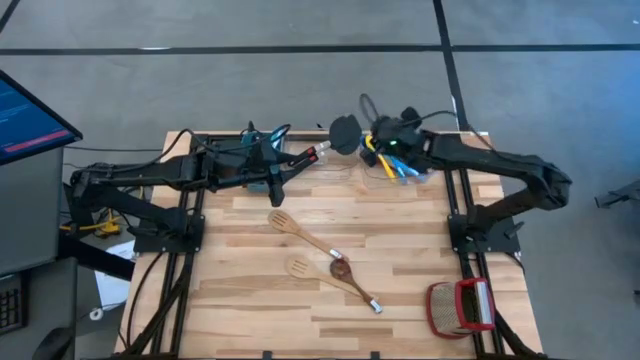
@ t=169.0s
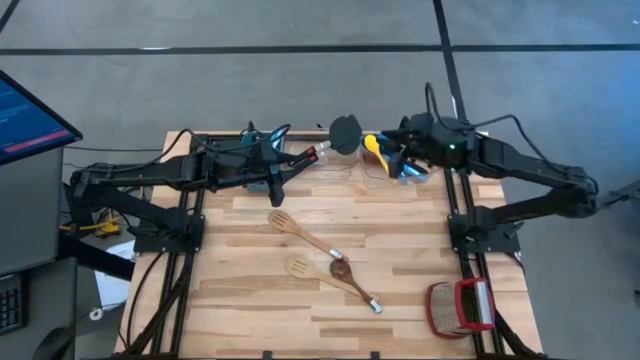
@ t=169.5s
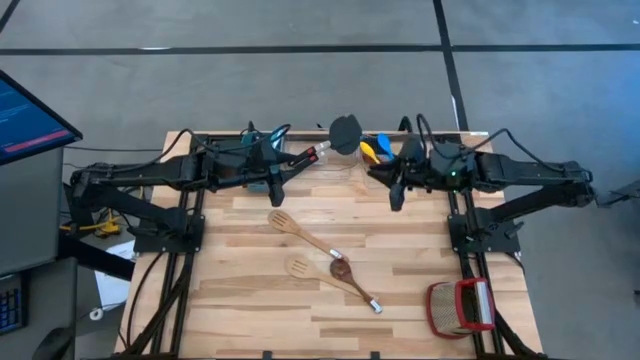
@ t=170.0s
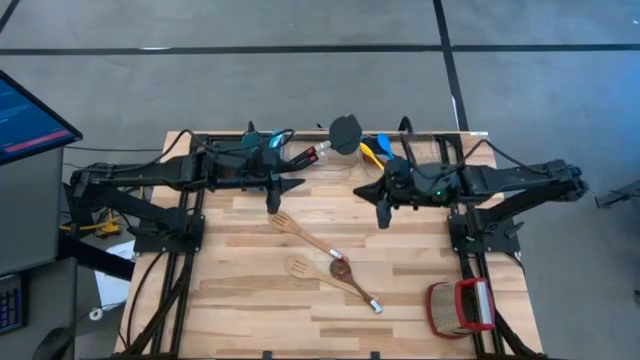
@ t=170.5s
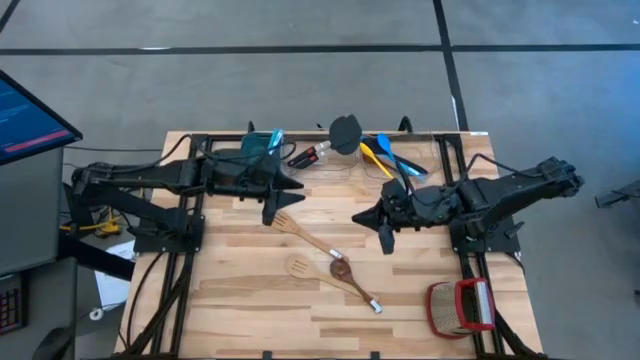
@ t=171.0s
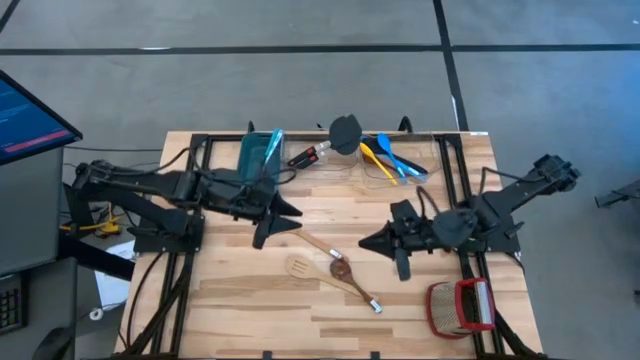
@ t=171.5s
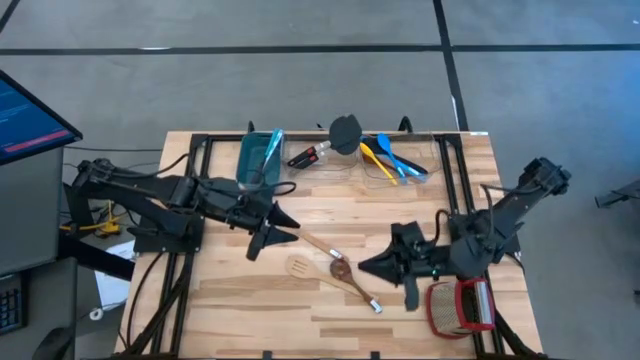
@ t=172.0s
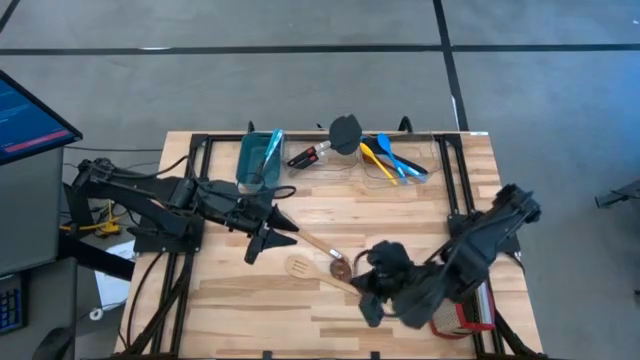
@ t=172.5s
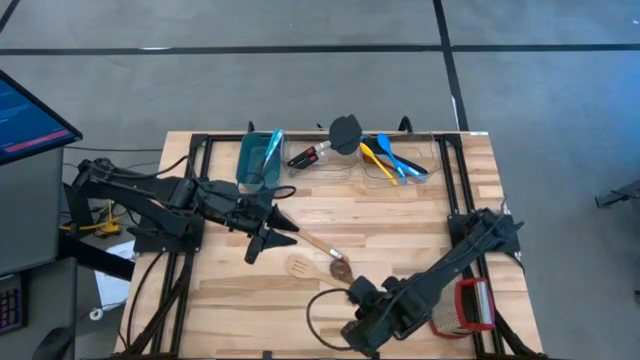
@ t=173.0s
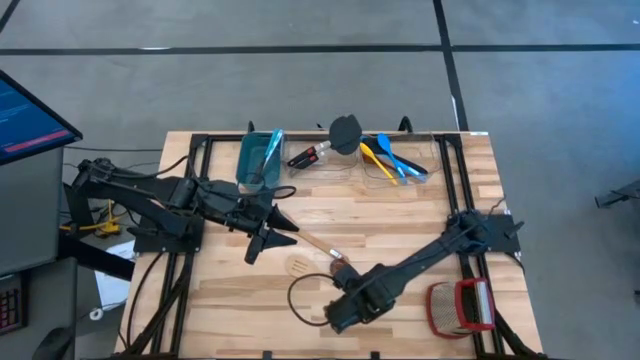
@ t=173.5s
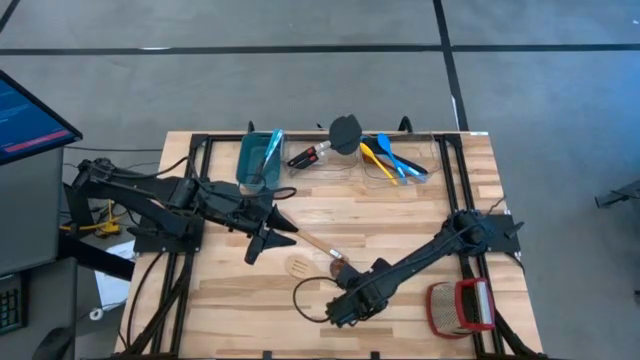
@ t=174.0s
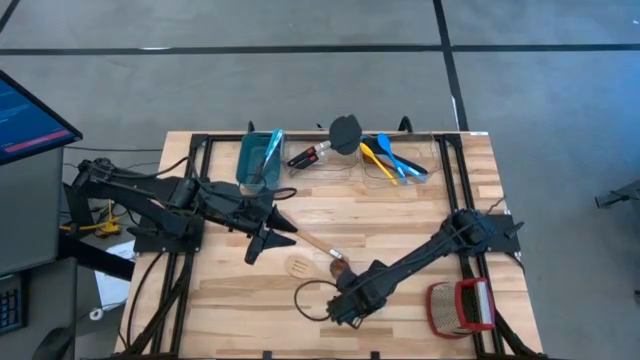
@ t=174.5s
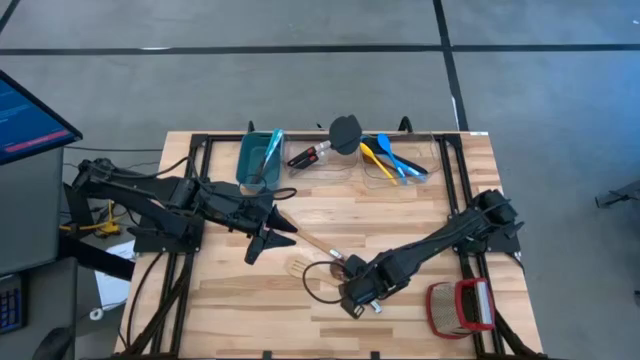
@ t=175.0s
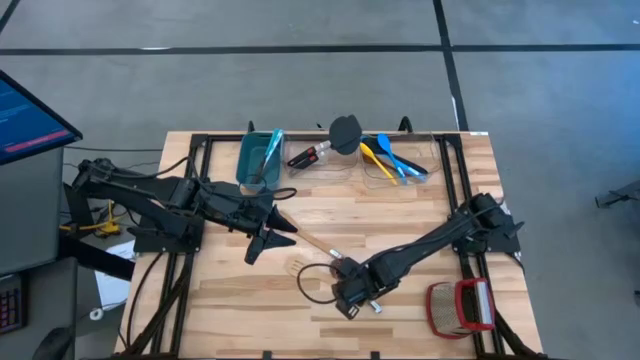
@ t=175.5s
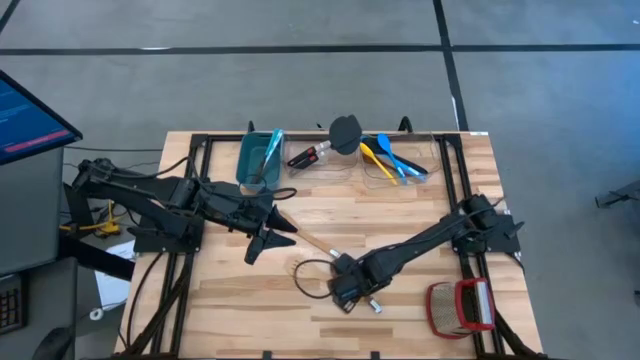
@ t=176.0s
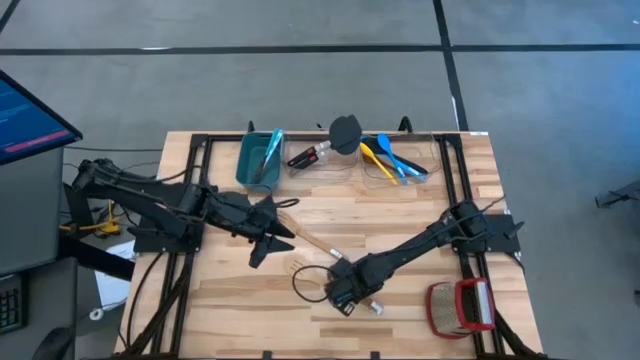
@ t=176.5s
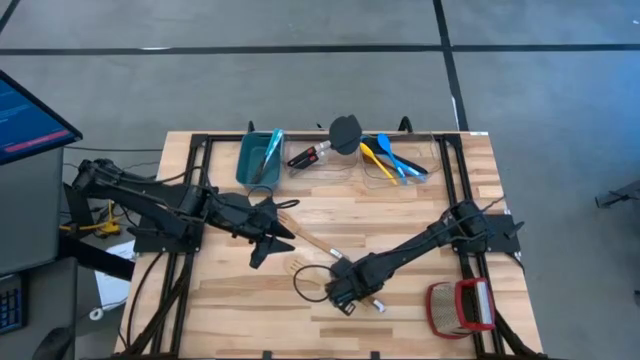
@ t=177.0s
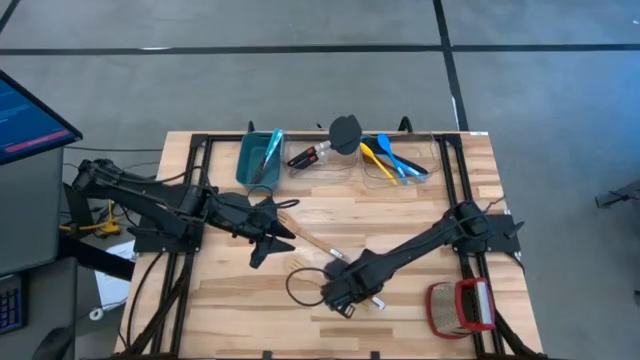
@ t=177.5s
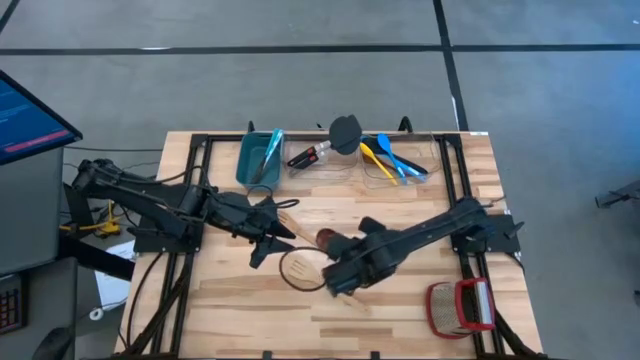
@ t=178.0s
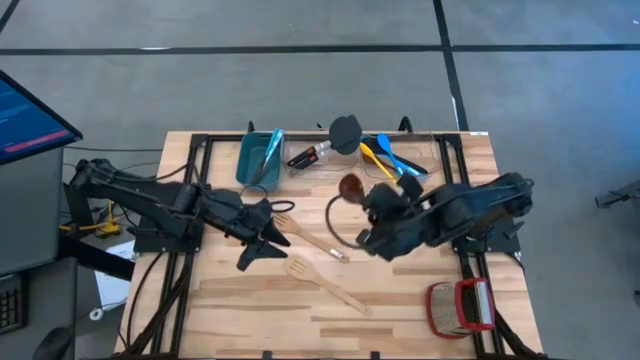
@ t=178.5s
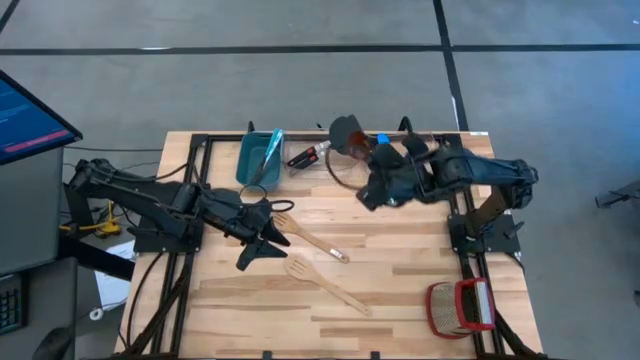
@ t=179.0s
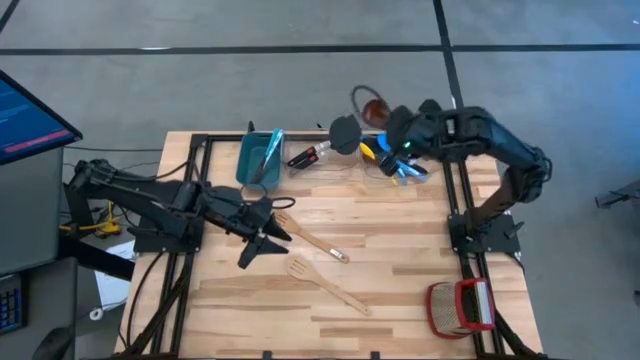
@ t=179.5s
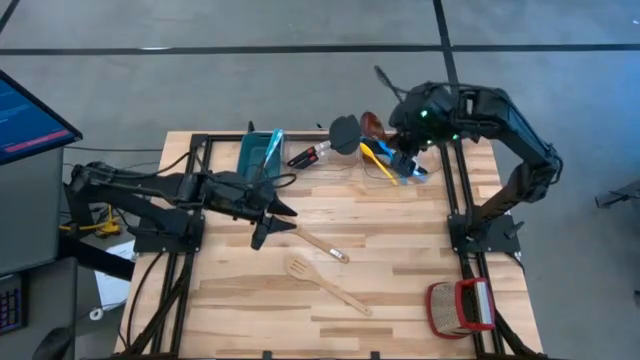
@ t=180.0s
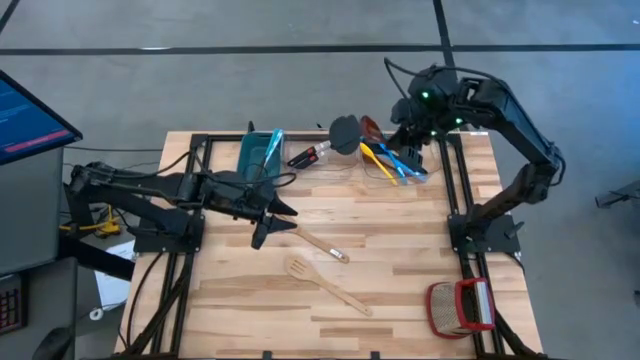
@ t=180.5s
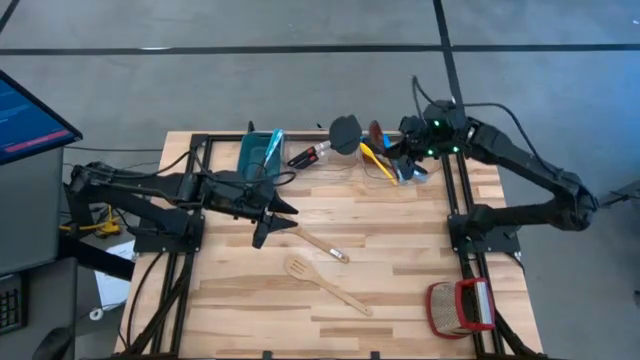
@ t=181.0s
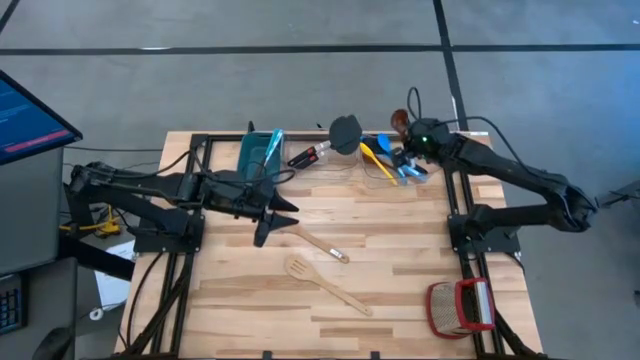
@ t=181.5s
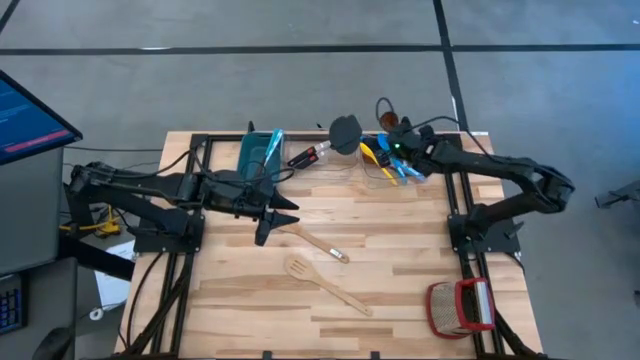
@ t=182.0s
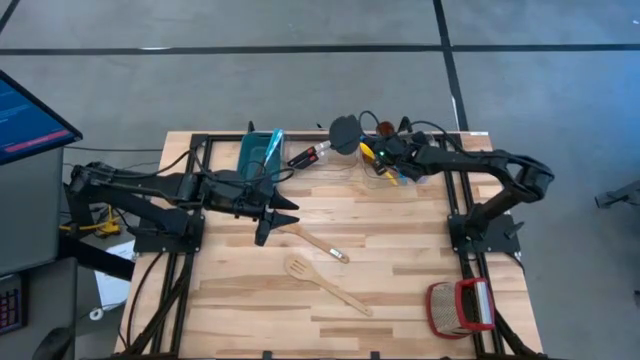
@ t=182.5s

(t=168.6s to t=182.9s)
Task: Pick & Place Kitchen Items
Put the brown serving spoon into the right transparent bin

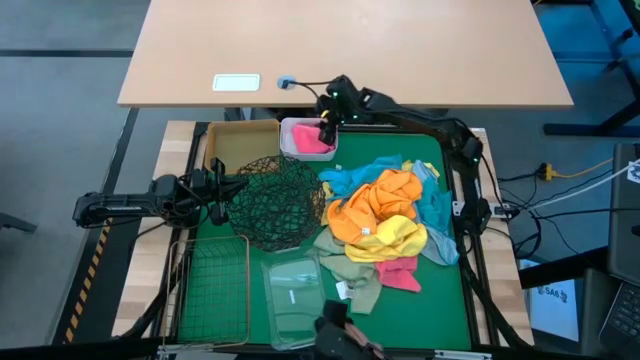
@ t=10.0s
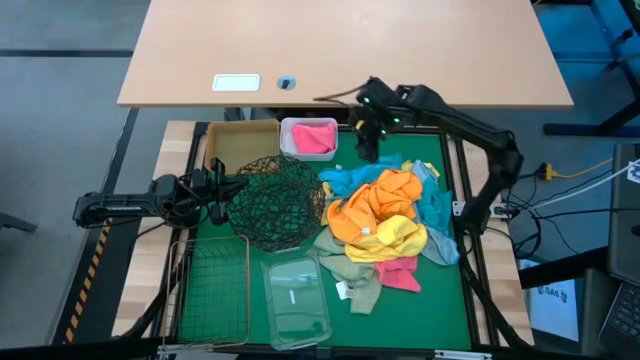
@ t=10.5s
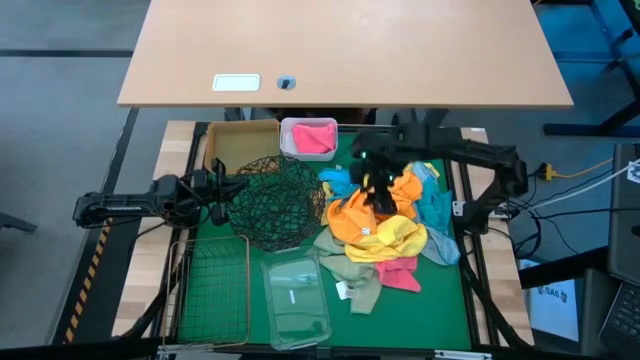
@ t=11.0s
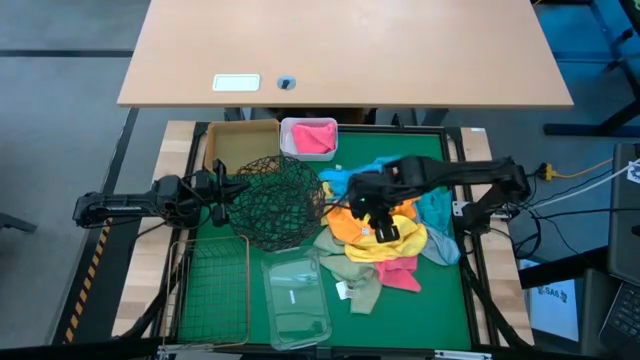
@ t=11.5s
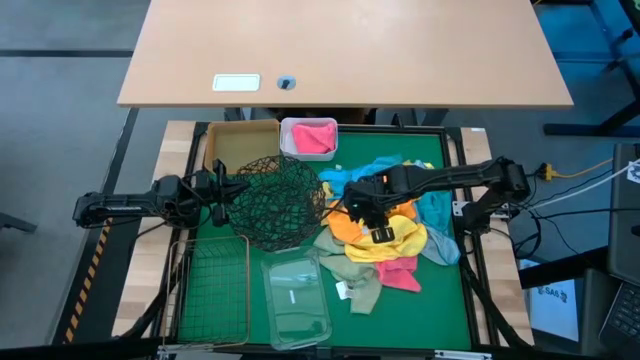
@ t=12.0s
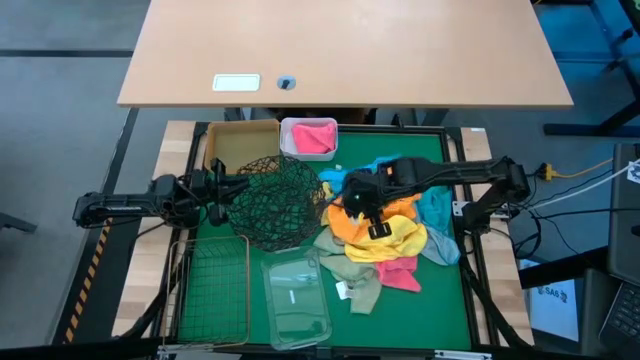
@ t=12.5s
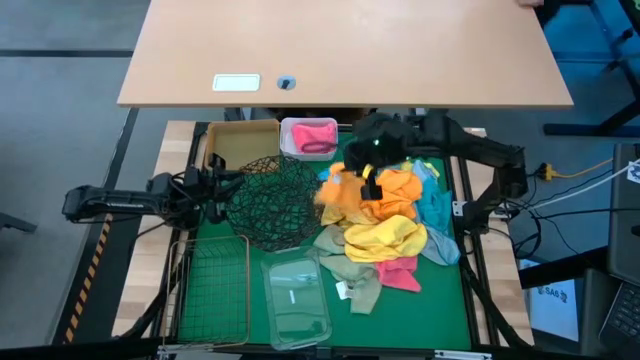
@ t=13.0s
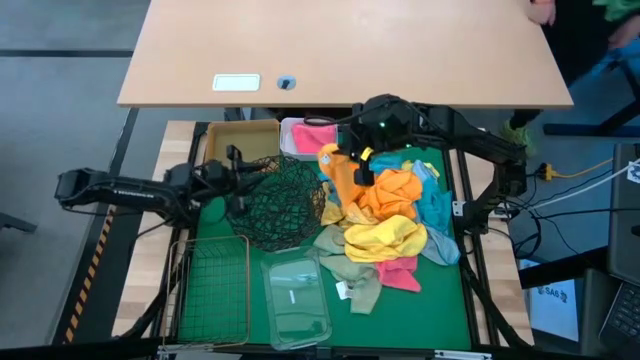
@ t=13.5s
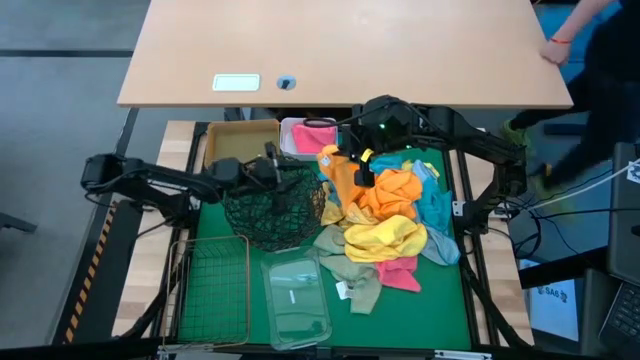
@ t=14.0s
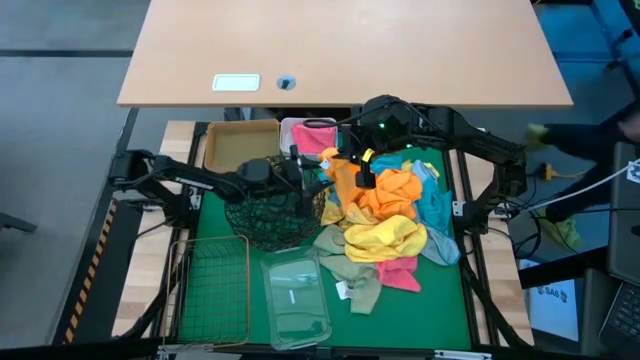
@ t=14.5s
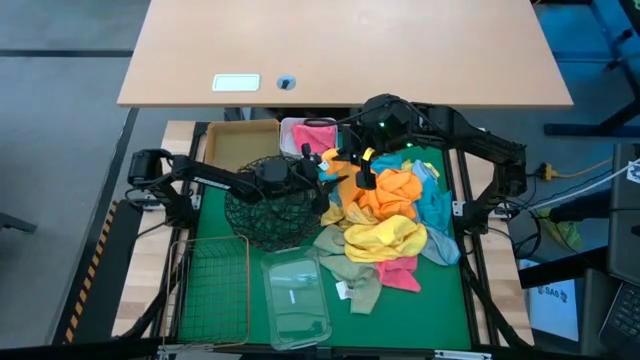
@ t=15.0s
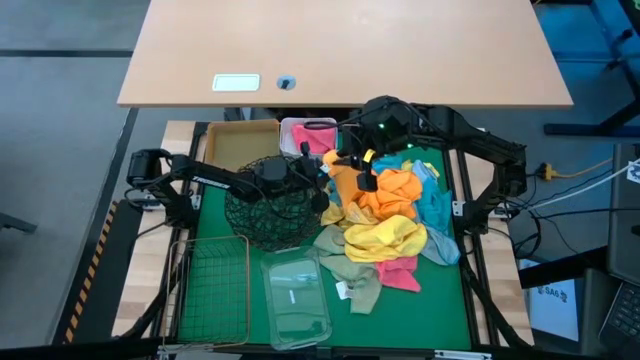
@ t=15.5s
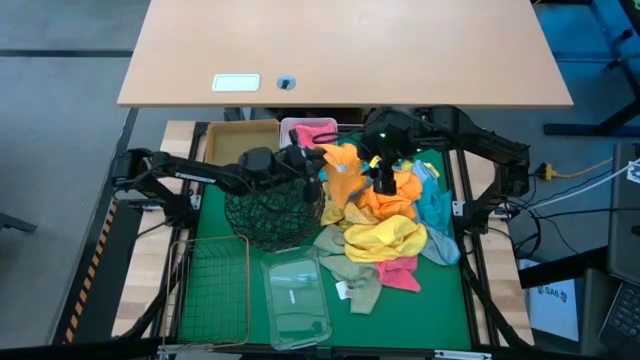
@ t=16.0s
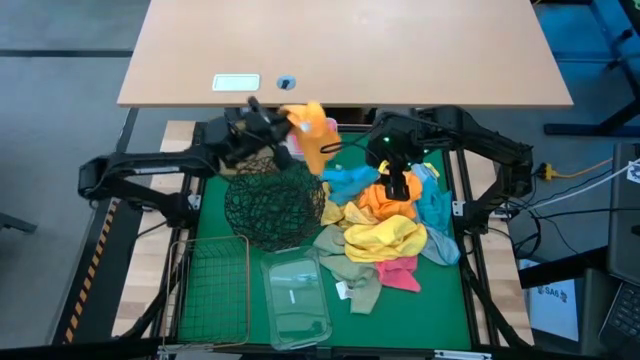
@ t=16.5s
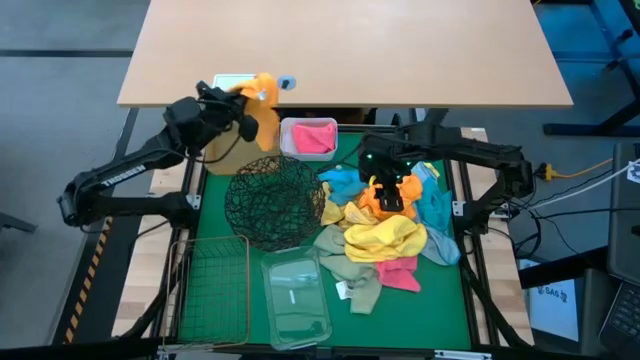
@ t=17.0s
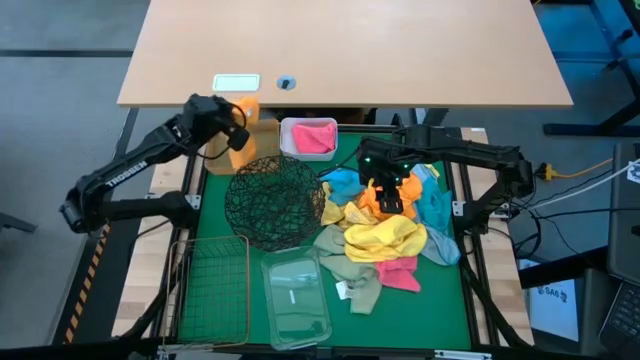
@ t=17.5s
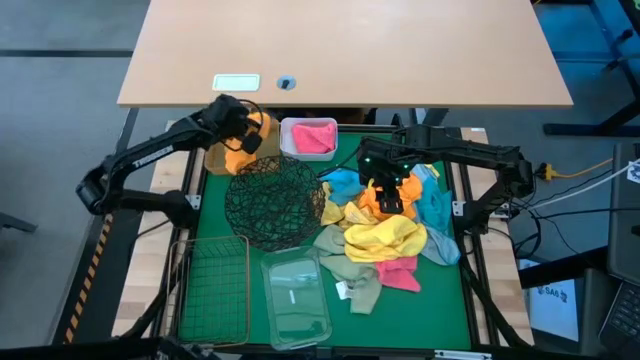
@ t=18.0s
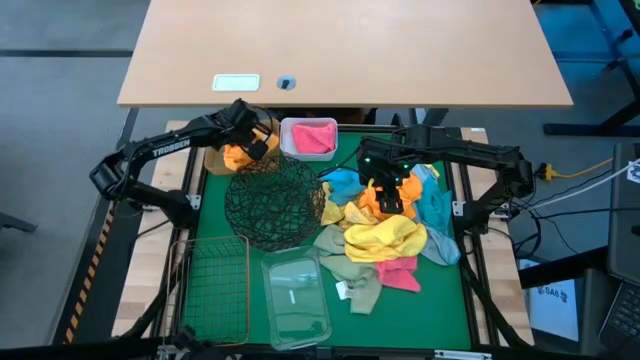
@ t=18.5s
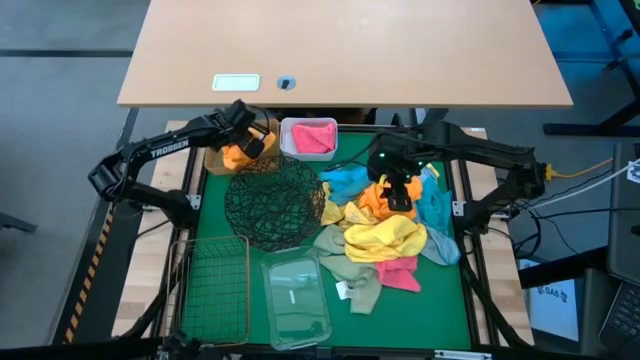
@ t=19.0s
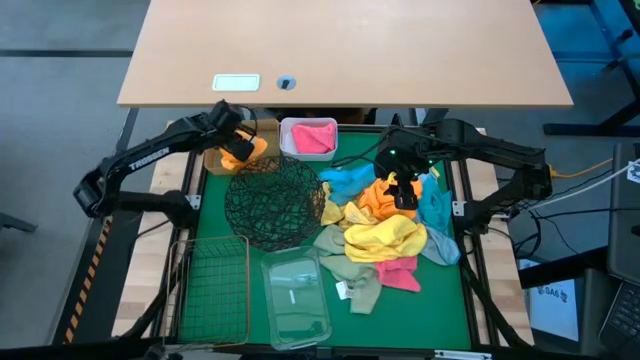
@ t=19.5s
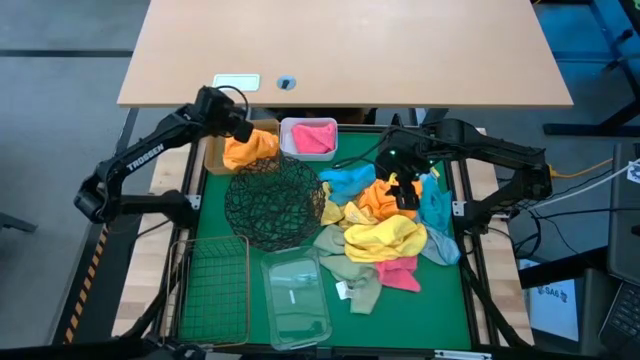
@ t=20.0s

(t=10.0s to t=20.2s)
Task: Sort microfiber towel by color & place in baskets
Put the orange microfiber towel into the orange bin
